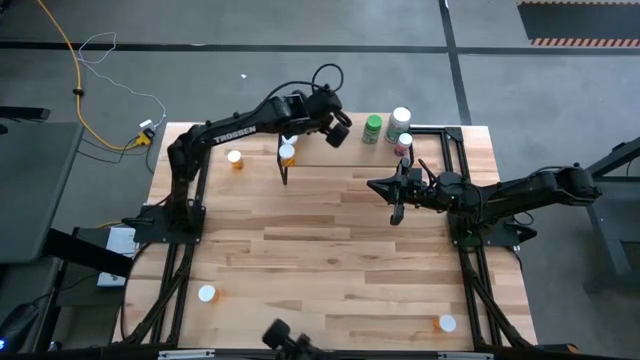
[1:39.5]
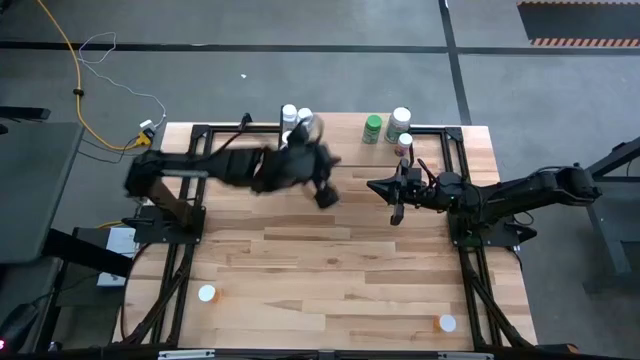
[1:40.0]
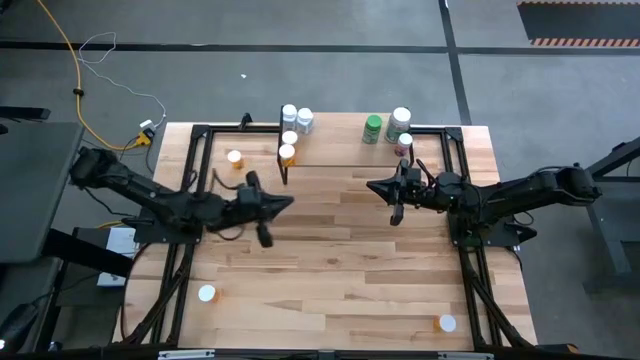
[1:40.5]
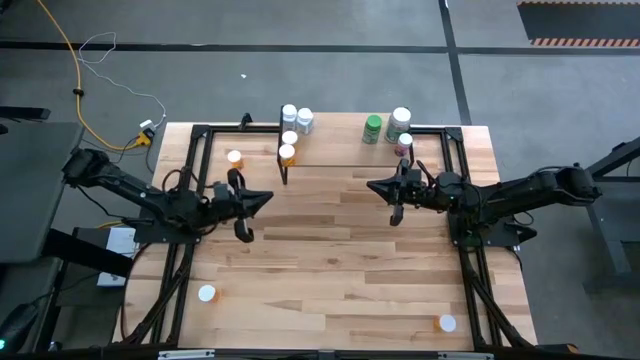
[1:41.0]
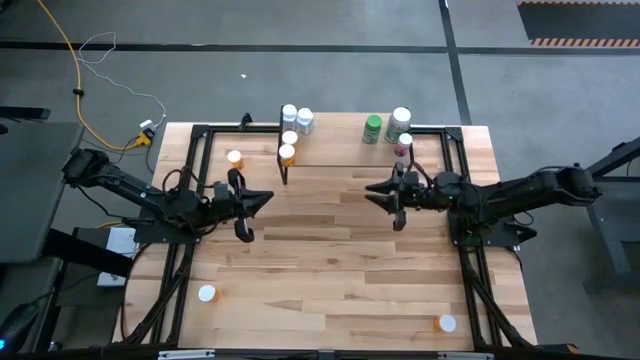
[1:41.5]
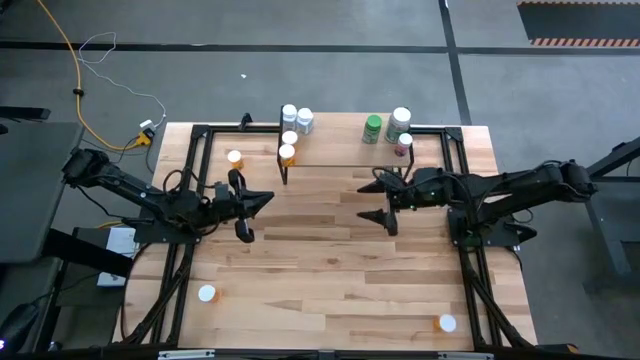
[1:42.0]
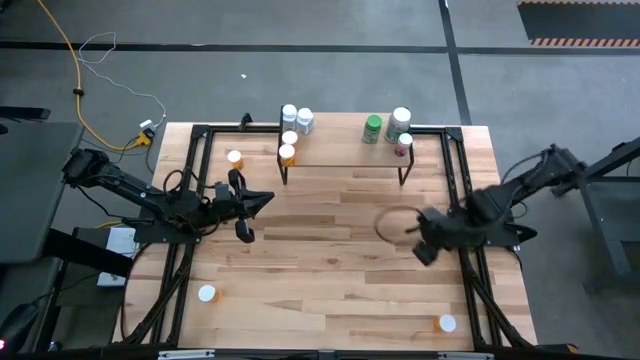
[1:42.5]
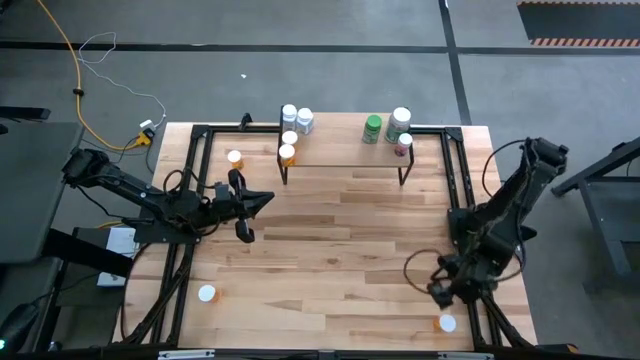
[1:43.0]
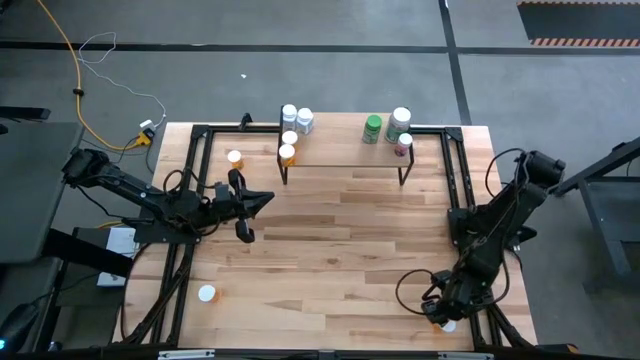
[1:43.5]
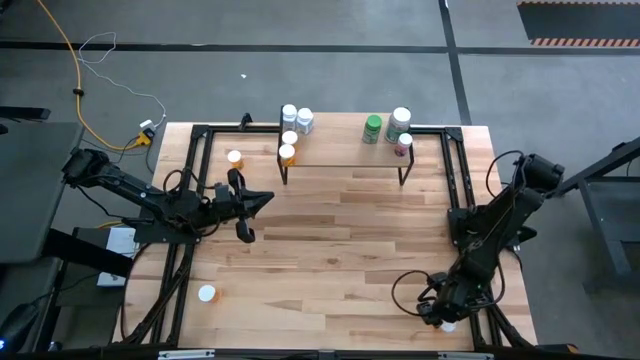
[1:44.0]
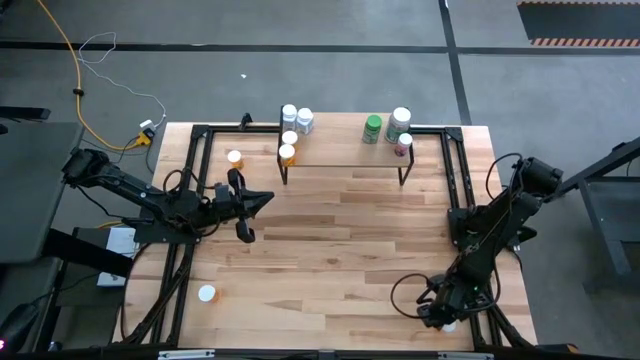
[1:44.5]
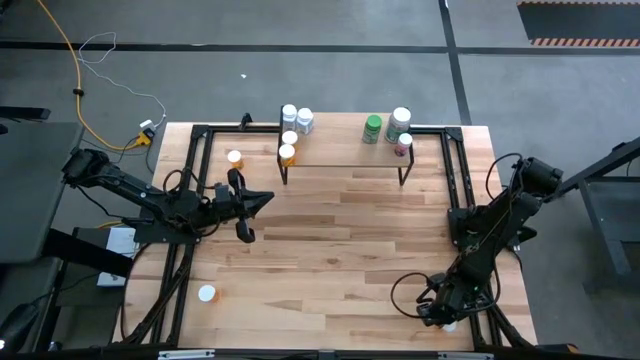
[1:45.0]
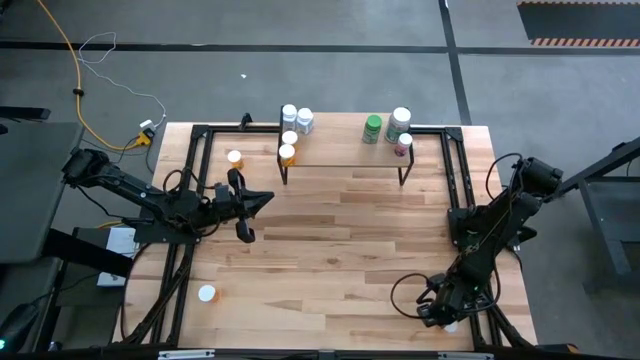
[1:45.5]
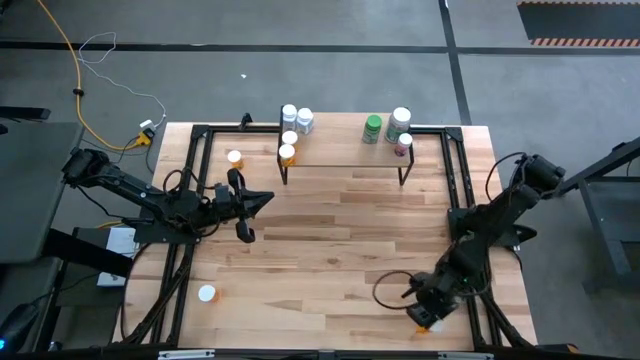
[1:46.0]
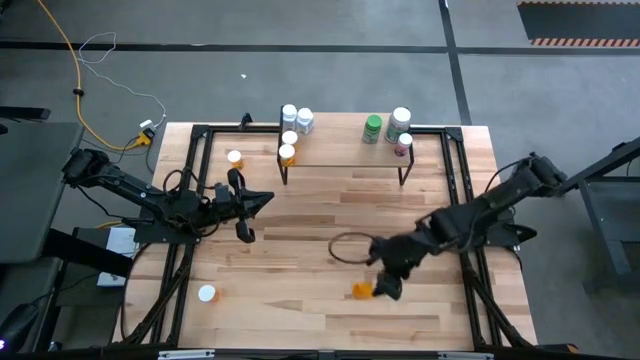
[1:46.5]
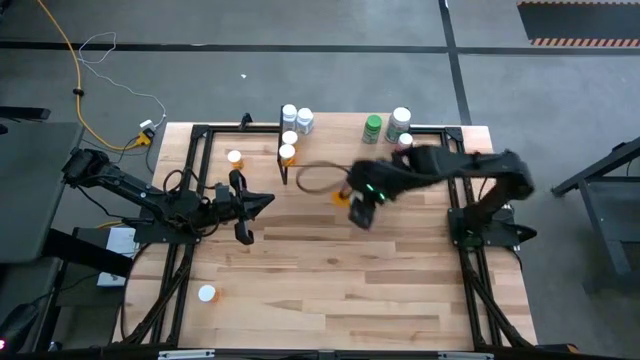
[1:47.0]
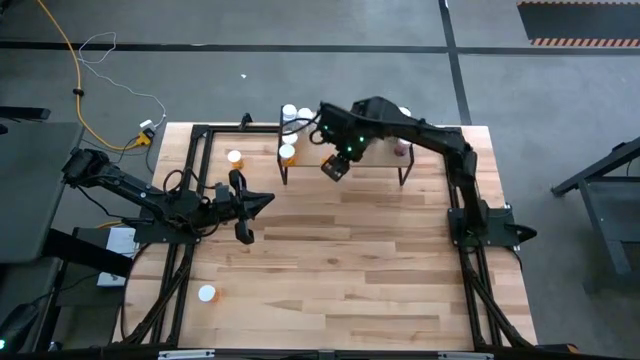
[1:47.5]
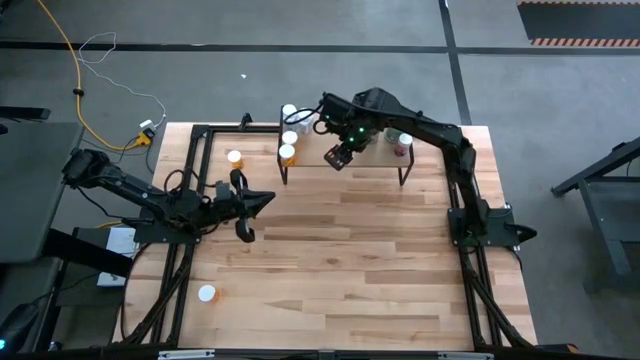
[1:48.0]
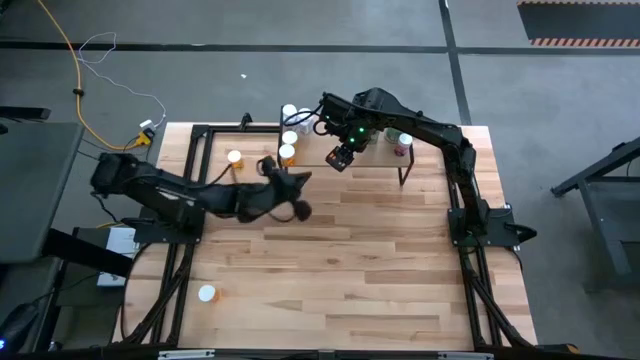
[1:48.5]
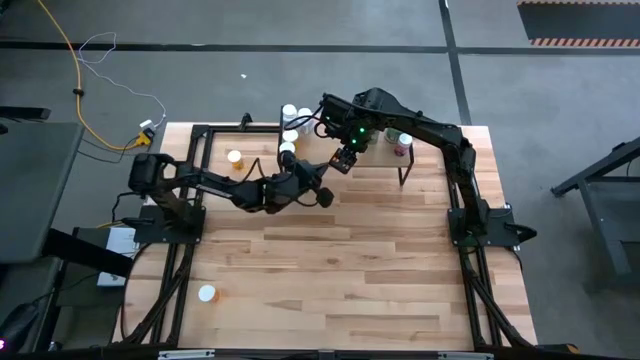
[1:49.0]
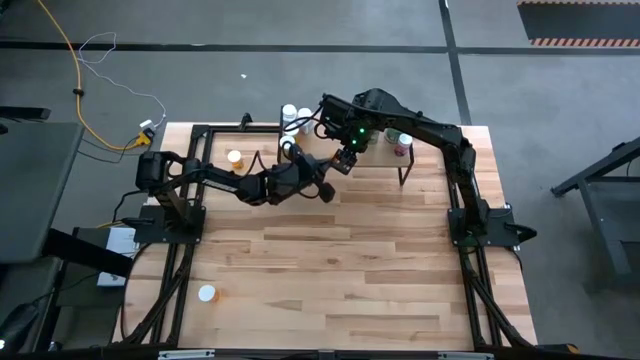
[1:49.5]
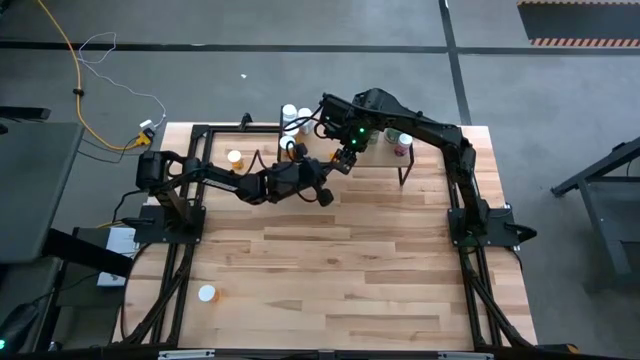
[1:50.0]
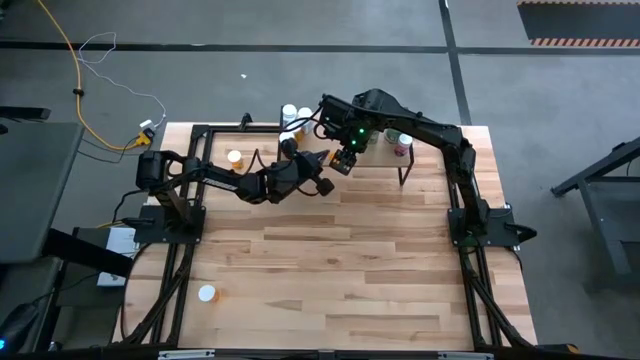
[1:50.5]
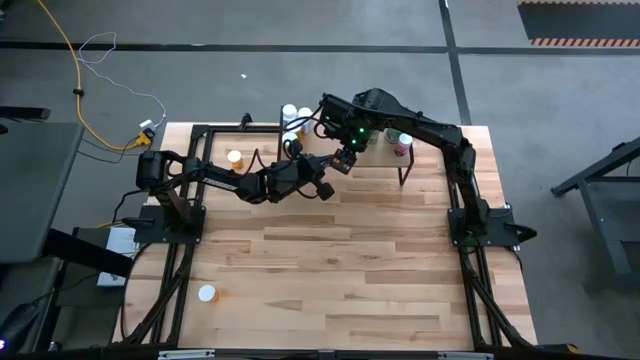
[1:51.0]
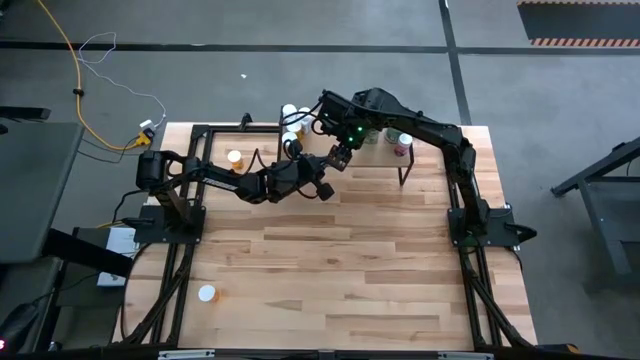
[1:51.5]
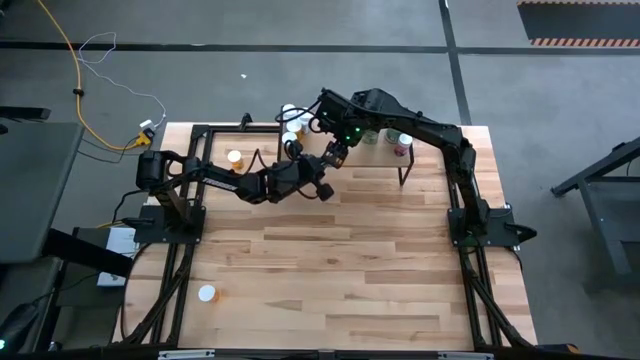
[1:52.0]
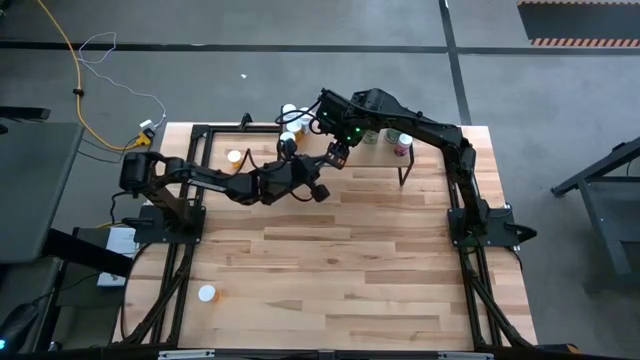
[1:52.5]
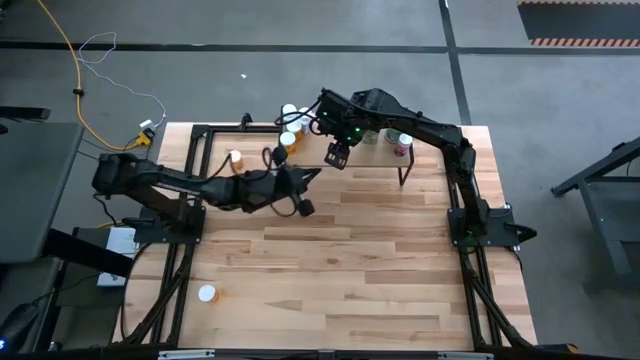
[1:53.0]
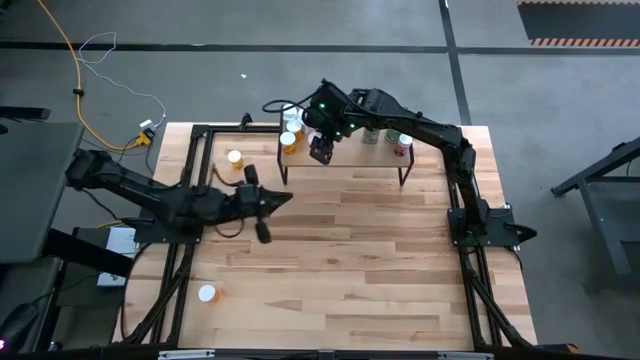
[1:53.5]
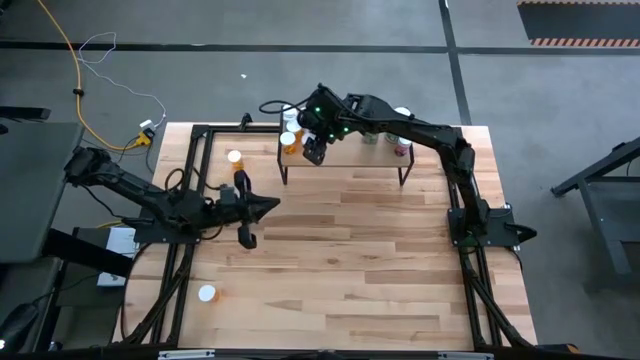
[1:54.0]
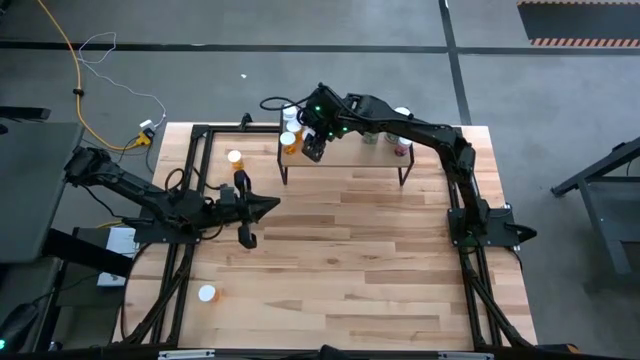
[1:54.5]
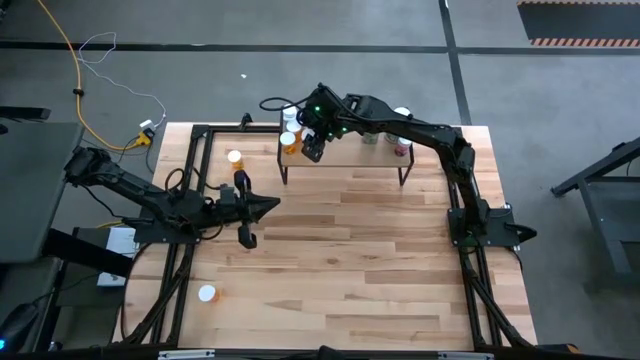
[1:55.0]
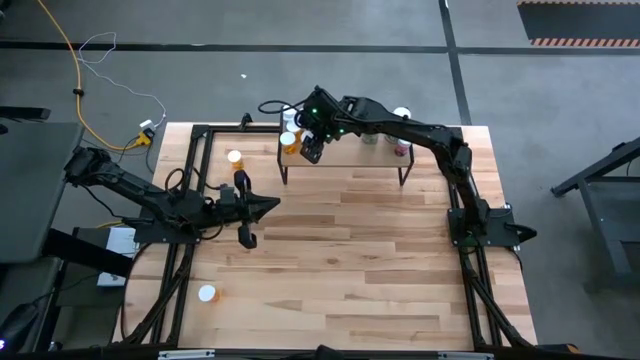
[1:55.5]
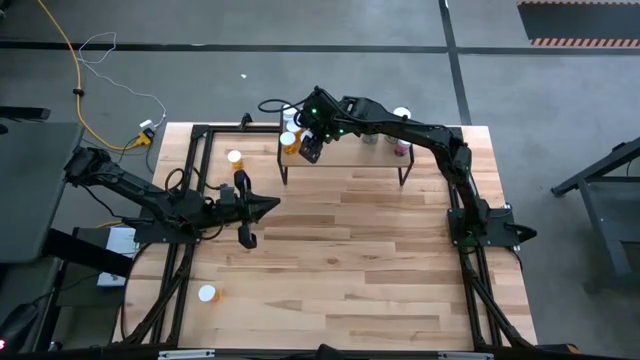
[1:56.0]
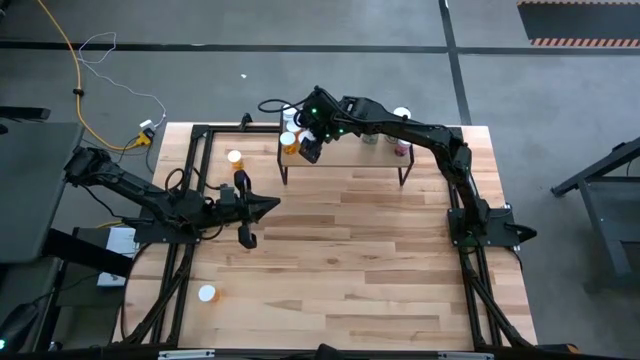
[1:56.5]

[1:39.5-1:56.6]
Task: Pick and place medicine bottles onto shelf by color
Put the orange pill bottle on the shelf

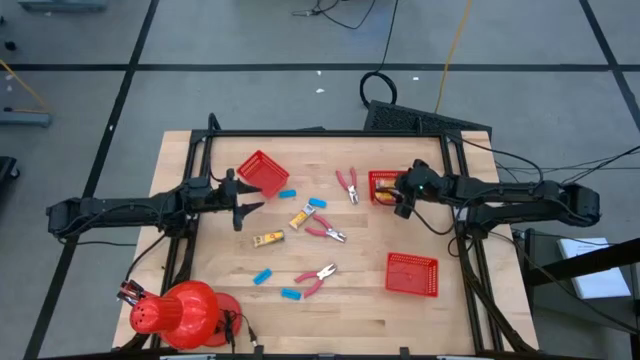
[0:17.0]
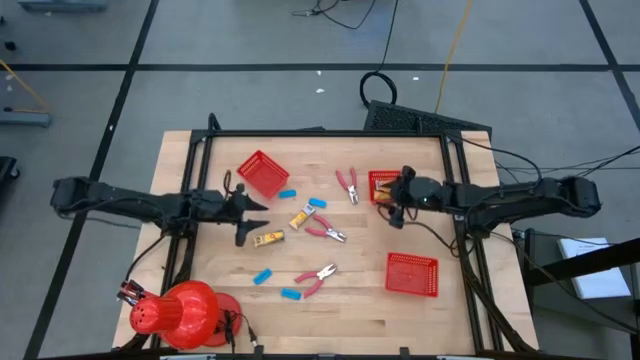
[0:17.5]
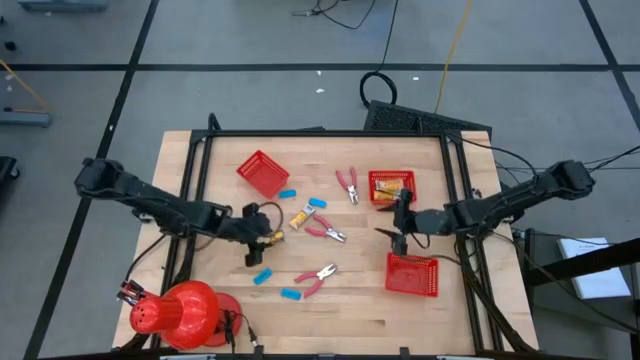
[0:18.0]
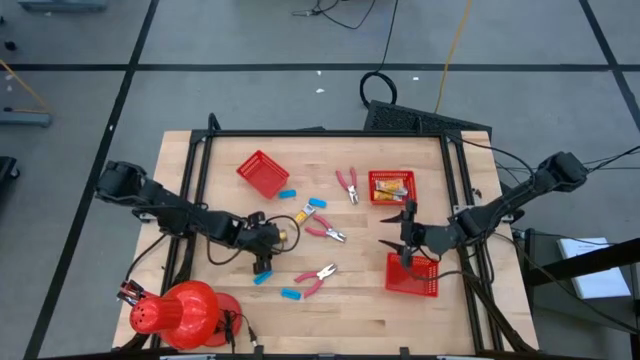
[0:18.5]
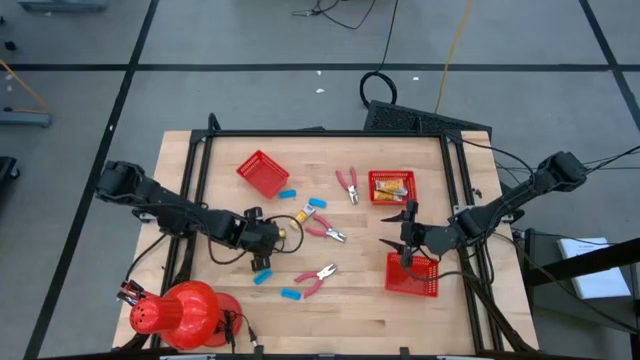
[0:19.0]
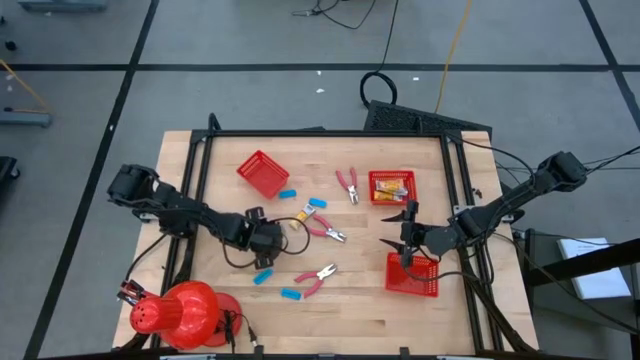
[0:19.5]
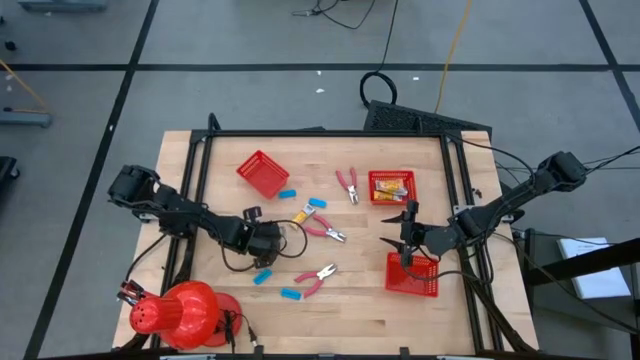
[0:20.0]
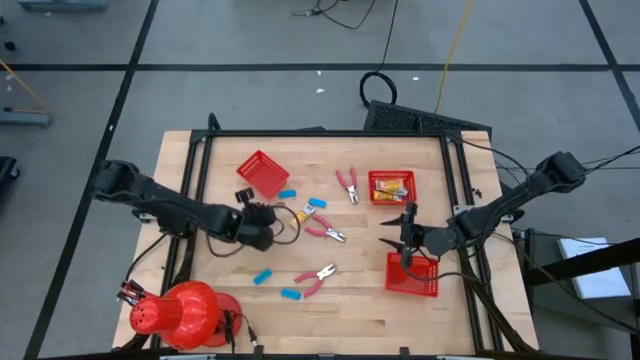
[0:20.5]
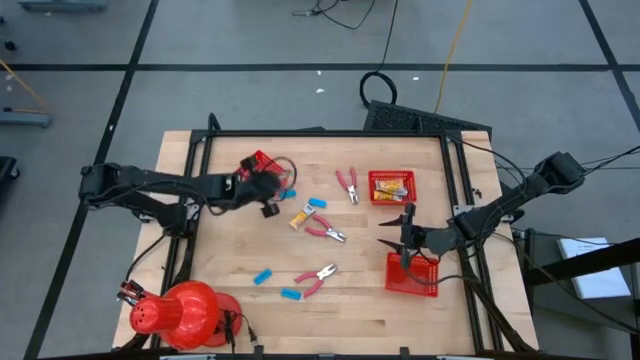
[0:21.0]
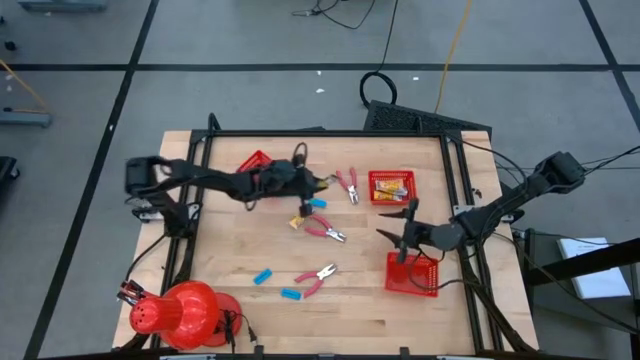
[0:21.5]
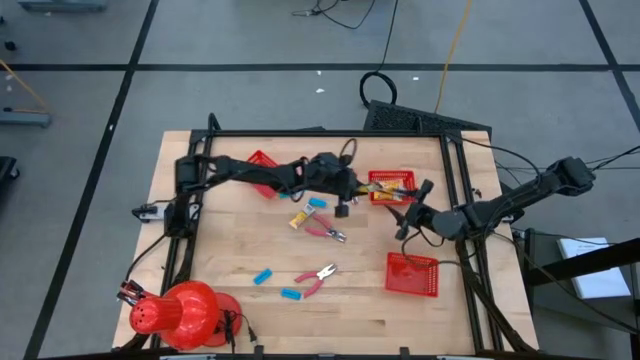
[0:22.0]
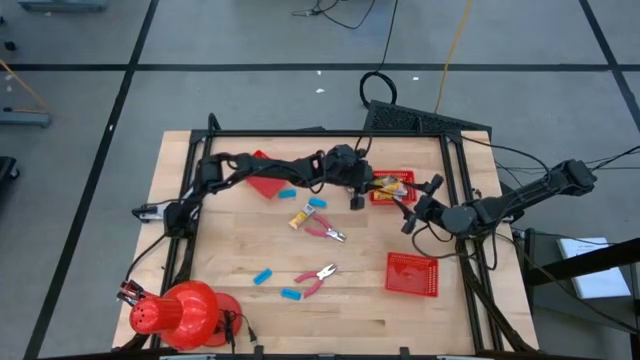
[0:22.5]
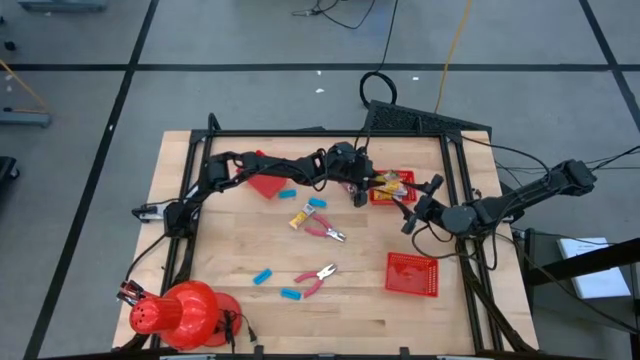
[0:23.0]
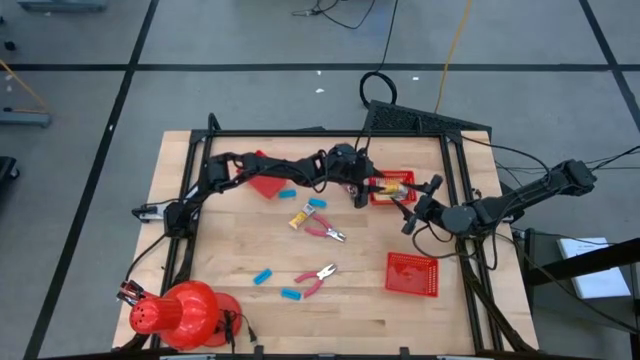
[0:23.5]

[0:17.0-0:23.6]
Task: Pick & Place School Supplies
Put the yellow crayon box into the top right red bin
